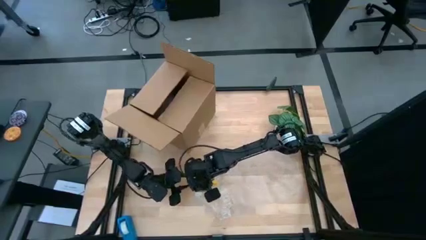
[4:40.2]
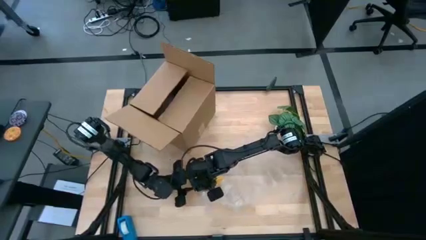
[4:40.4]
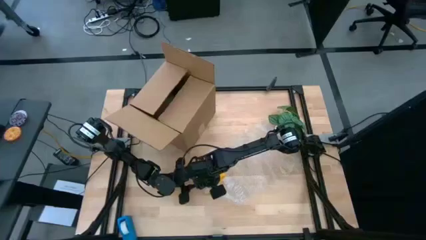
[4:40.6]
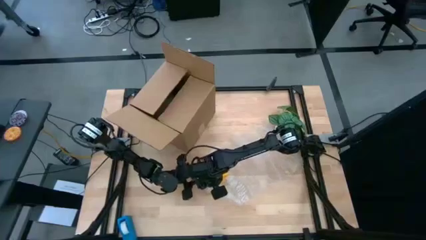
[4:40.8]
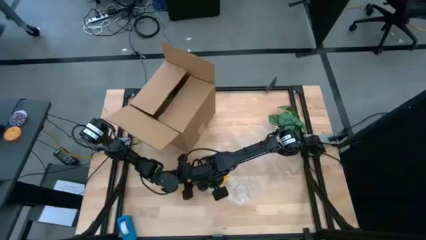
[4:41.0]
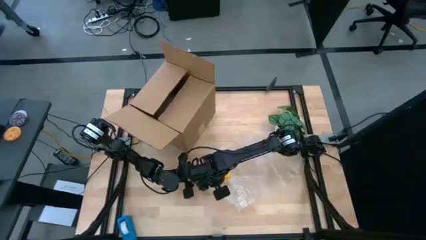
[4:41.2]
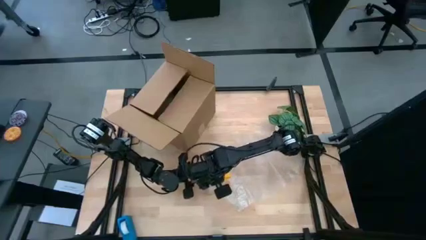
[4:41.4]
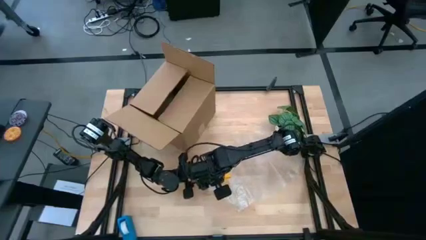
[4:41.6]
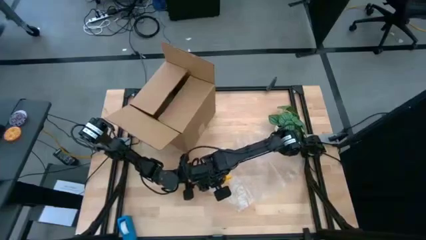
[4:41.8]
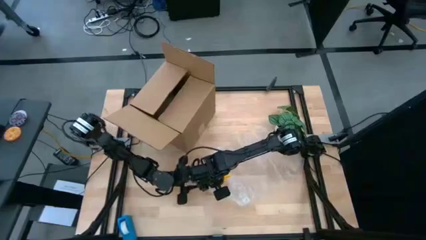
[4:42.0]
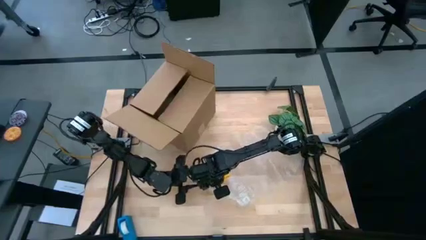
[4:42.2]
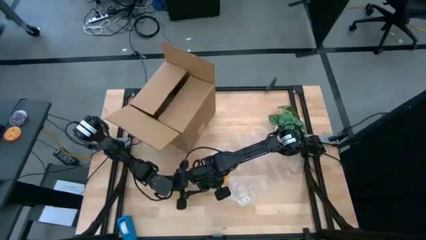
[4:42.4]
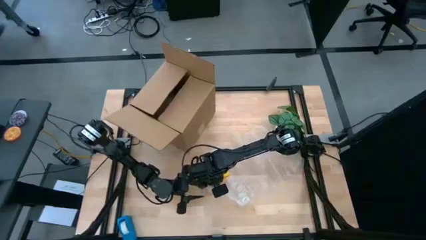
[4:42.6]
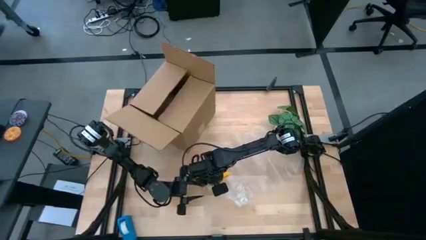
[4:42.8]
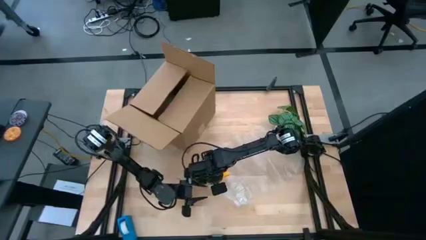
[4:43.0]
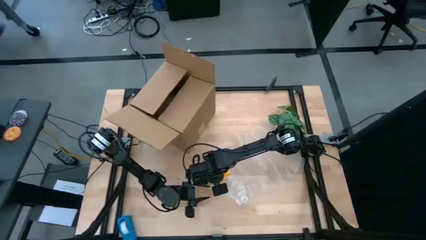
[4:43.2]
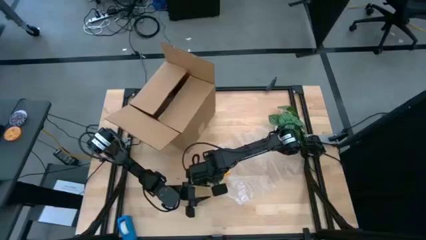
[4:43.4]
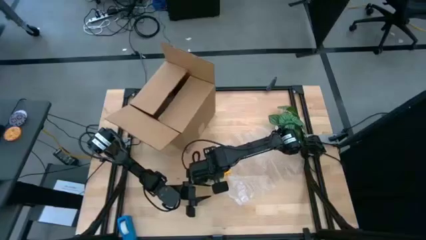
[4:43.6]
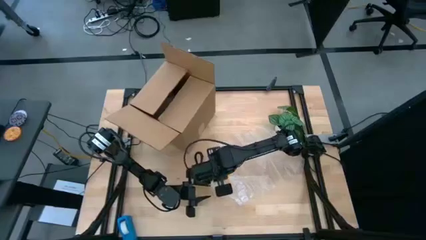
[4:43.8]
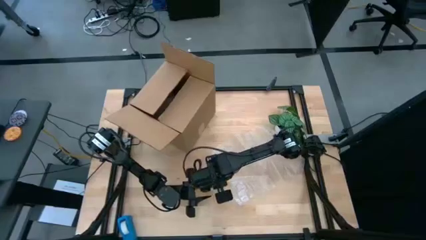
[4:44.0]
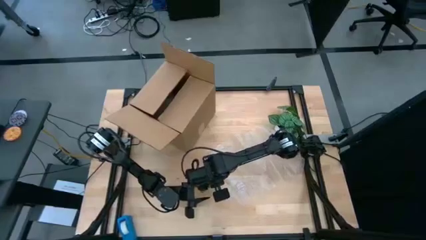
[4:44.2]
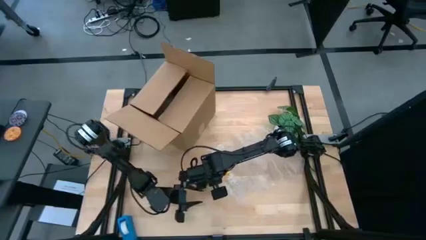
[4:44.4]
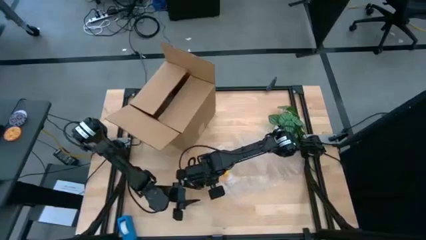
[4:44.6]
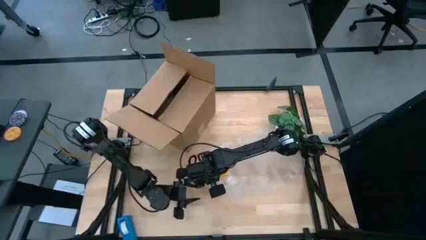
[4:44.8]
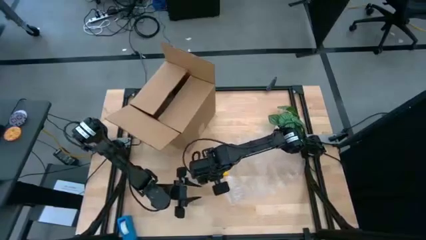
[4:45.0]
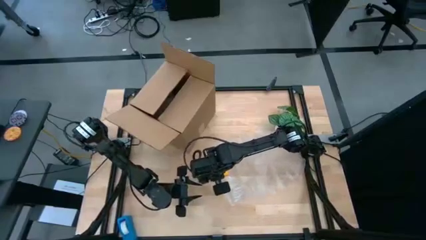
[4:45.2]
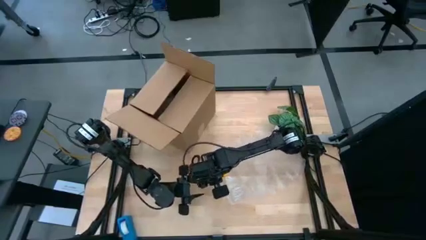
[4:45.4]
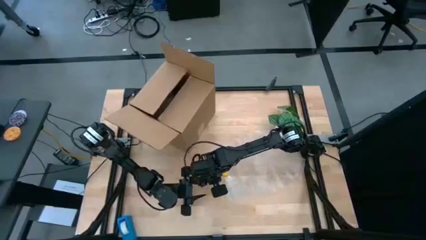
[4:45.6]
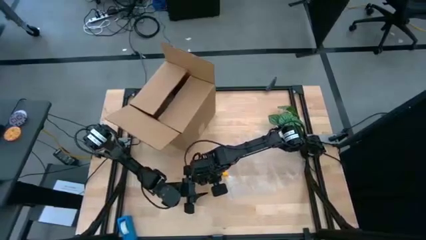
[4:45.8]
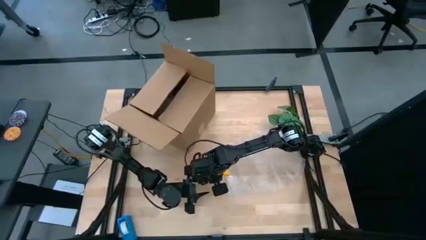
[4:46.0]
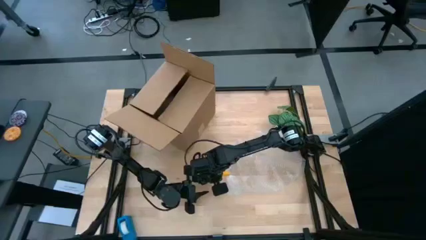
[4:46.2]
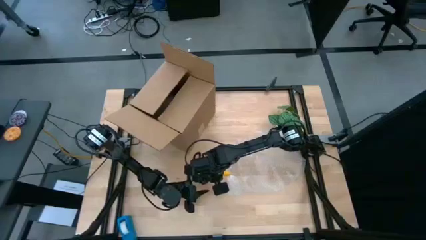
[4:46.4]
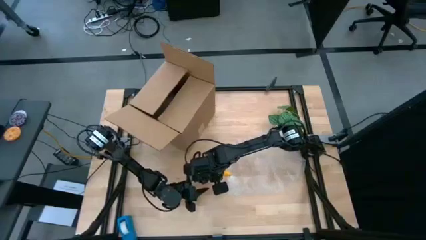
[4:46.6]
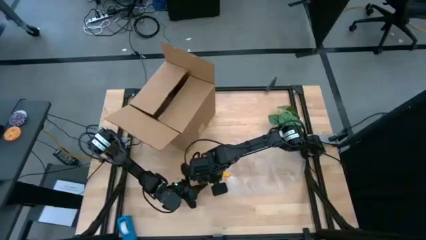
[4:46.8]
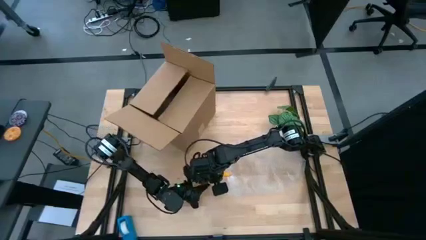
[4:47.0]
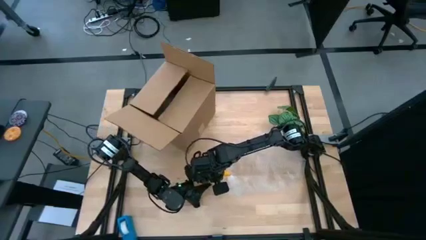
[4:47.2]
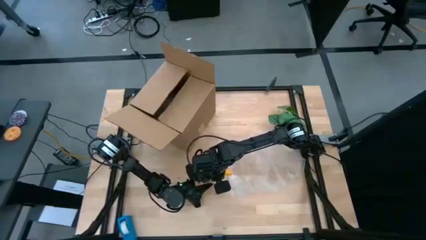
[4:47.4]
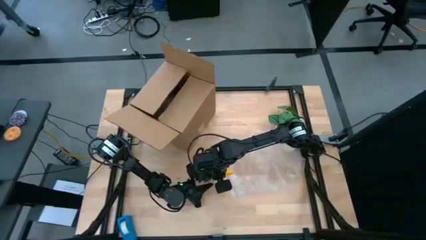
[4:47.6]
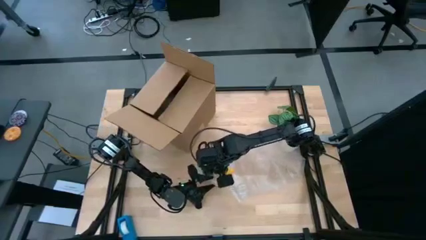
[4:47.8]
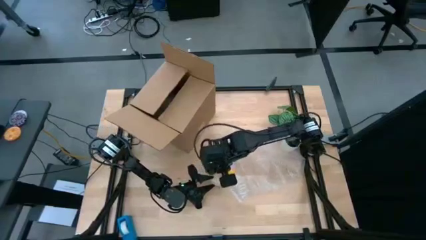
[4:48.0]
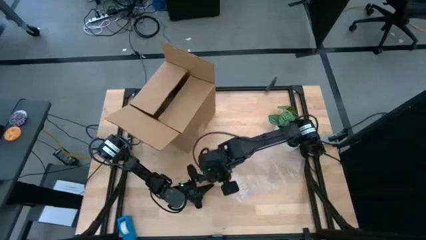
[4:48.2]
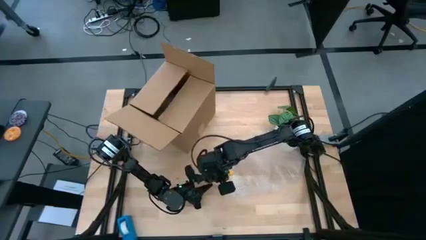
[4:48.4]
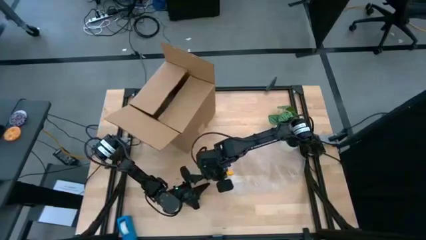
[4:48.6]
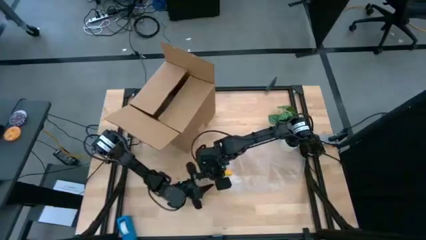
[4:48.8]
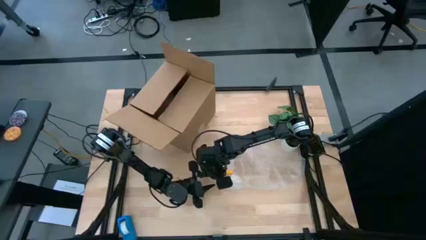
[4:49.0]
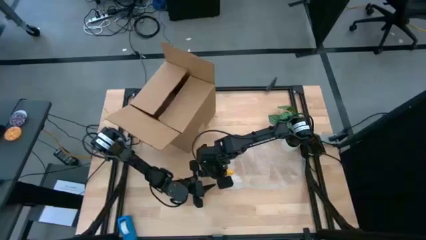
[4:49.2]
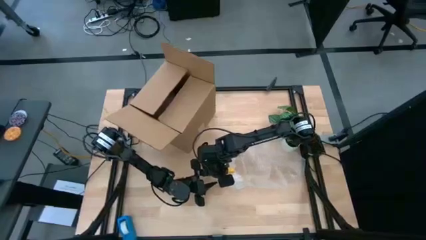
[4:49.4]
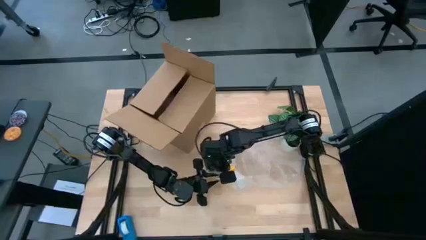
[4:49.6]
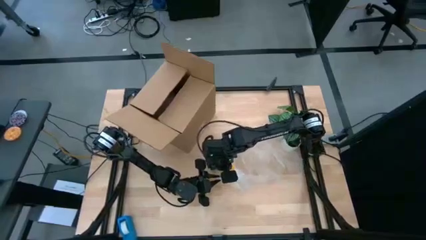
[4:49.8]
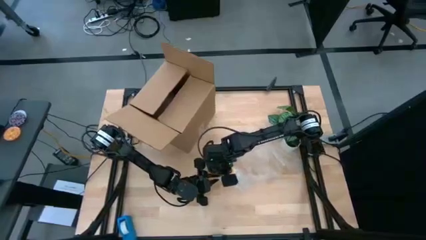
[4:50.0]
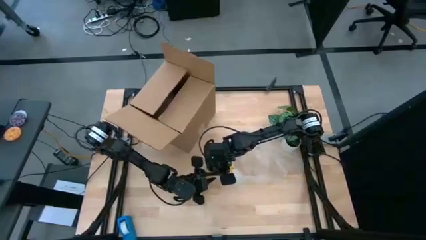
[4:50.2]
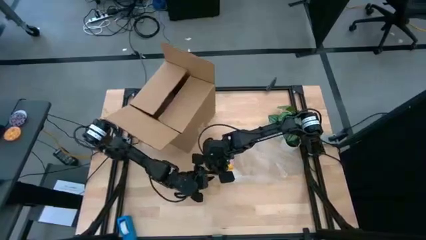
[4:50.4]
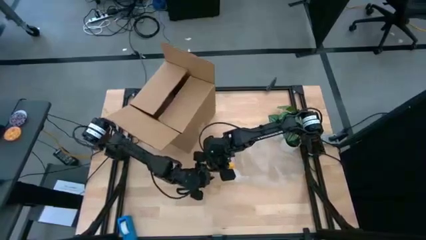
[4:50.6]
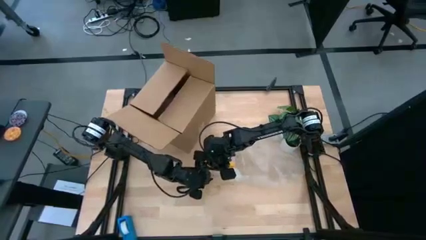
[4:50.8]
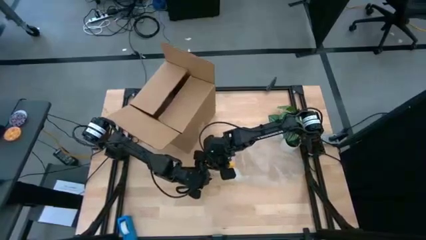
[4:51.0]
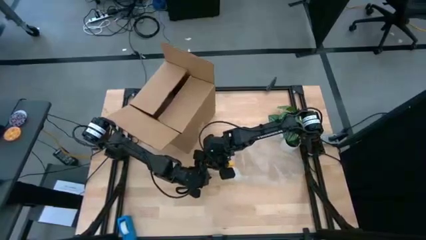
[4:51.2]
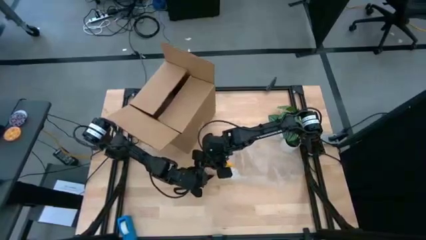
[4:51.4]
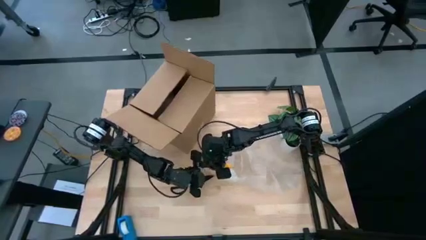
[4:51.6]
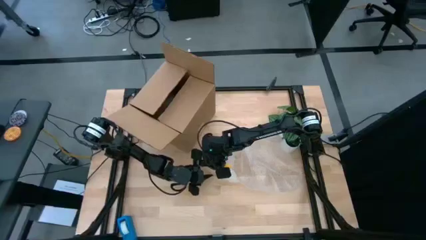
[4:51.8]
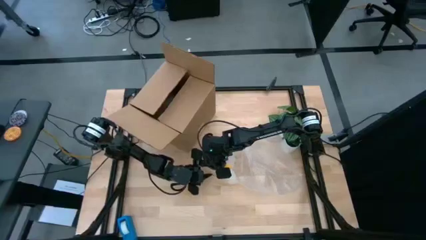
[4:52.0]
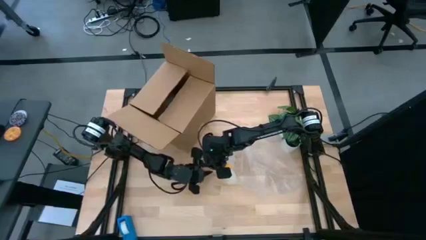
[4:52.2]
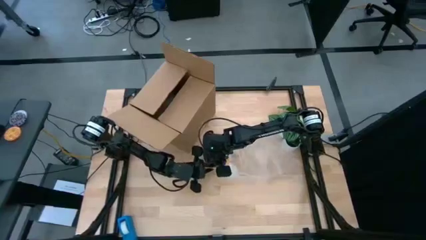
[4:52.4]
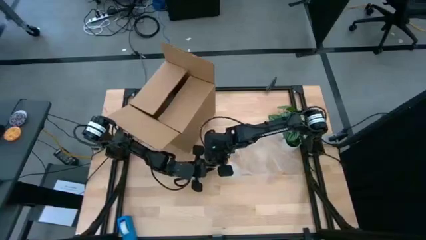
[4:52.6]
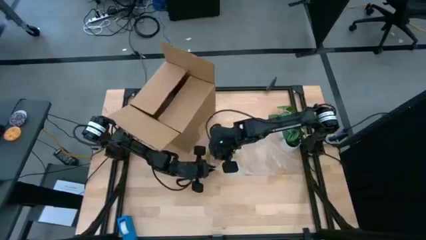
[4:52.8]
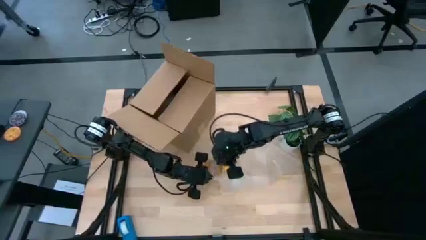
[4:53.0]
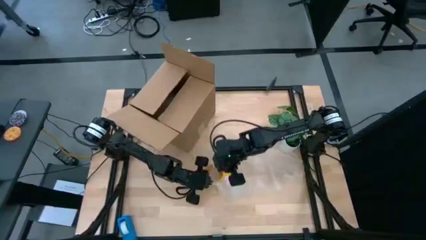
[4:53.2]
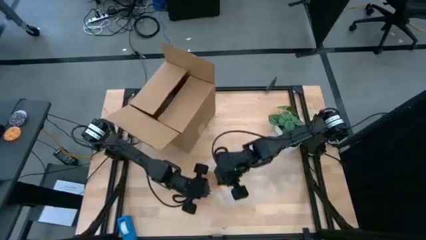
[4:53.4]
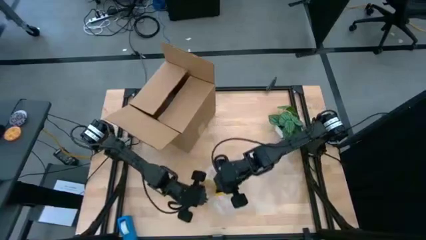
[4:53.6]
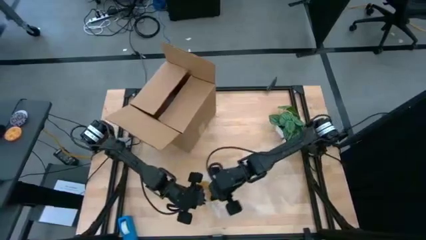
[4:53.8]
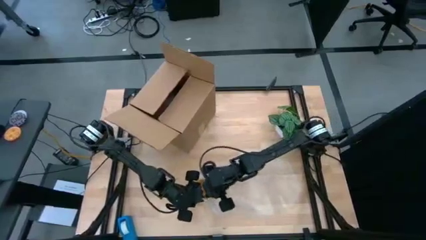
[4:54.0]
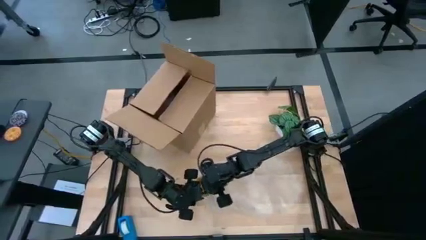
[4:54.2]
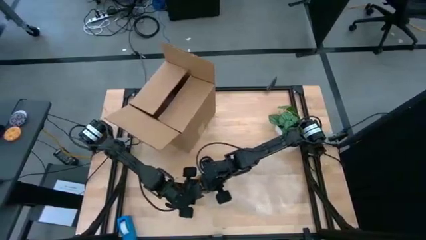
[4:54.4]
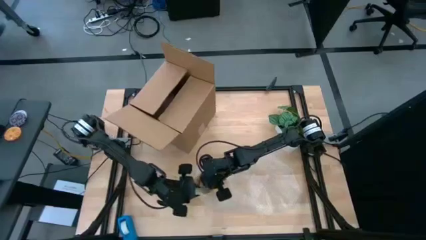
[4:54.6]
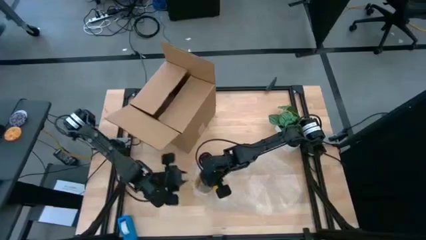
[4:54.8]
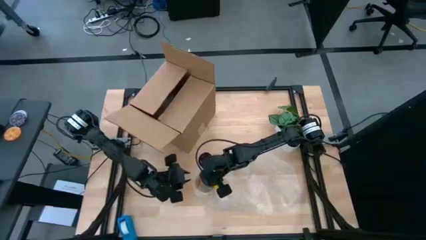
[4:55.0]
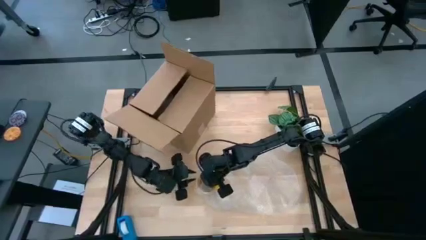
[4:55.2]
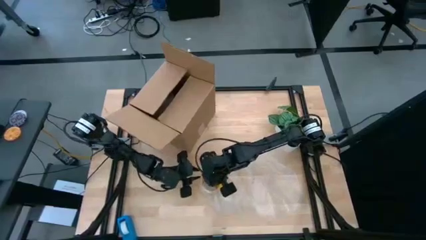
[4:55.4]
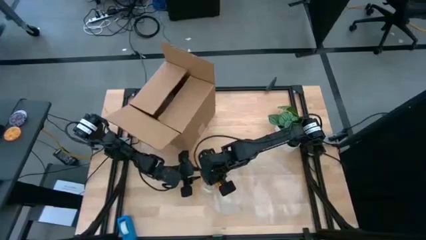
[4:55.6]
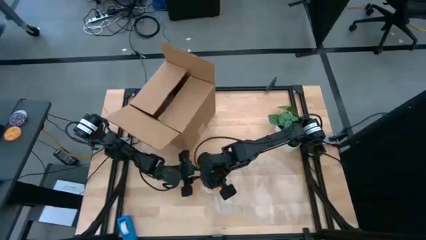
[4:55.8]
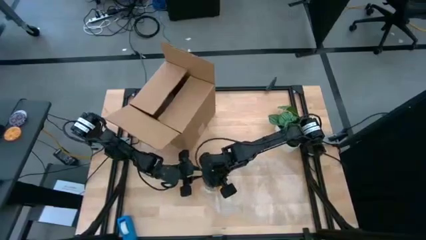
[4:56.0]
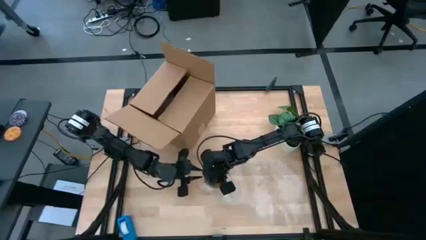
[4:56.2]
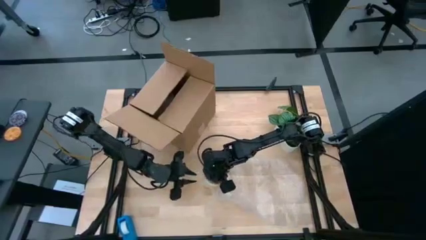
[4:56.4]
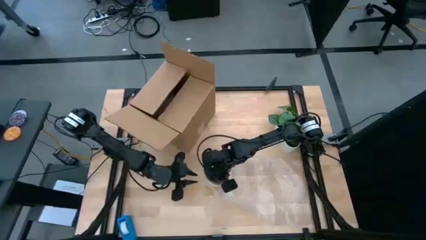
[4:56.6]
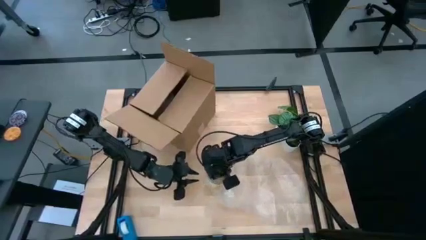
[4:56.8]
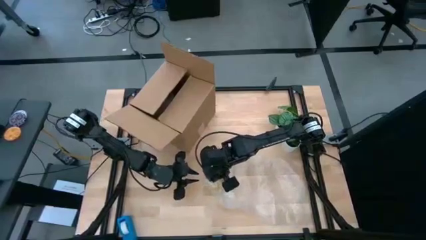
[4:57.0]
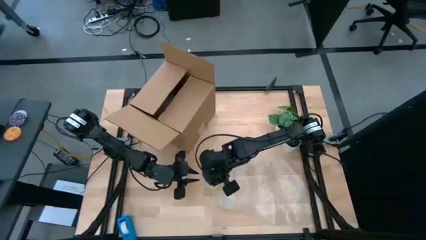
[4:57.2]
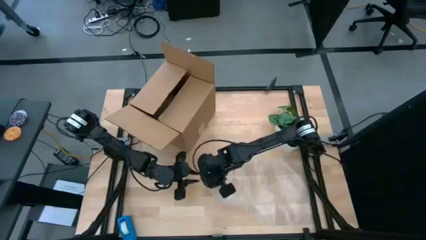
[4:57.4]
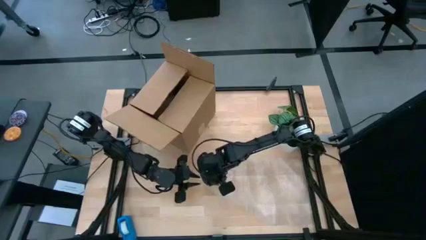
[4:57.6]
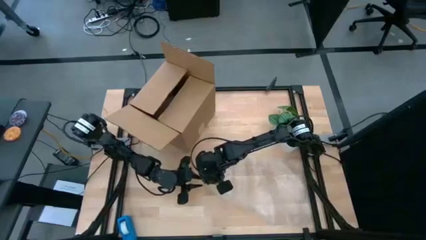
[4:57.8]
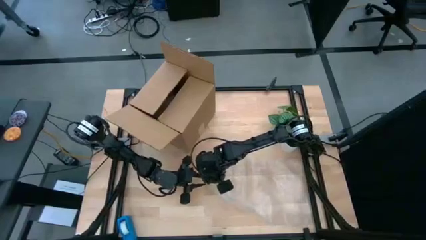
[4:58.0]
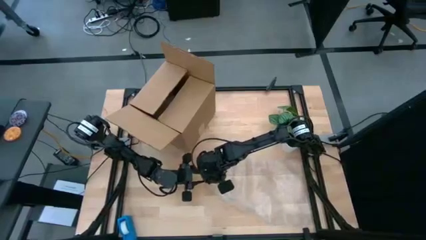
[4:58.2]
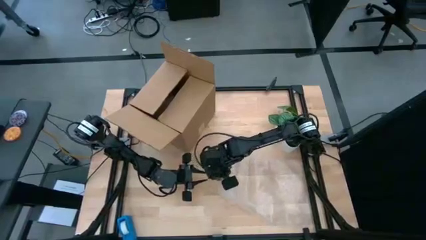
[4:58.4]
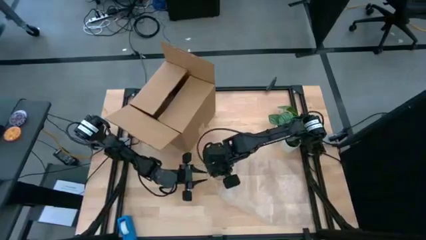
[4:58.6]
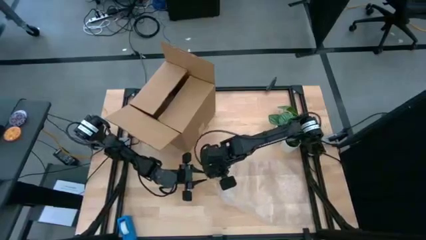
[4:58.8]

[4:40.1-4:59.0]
Task: wrap mug
Wrap the yellow mug with the bubble wrap
